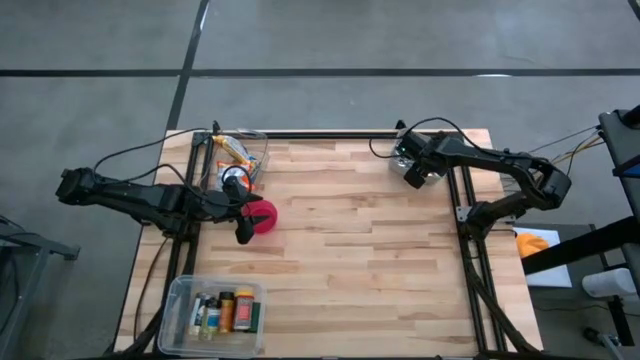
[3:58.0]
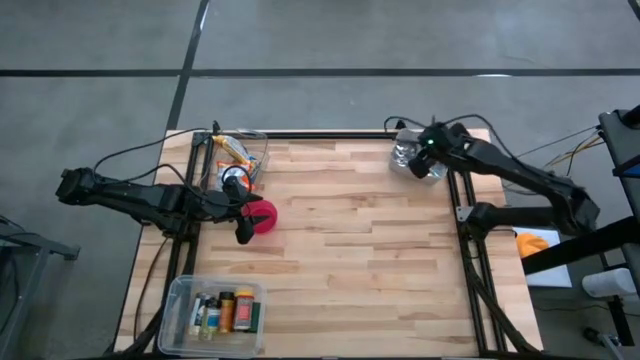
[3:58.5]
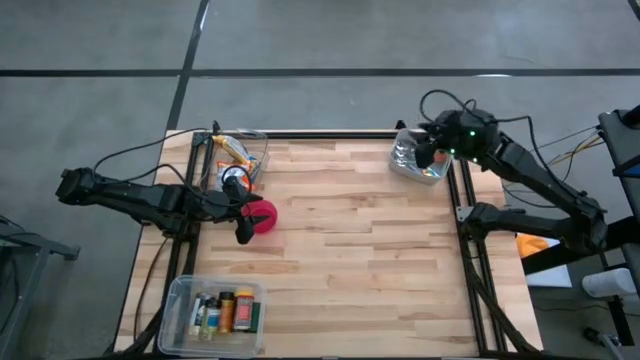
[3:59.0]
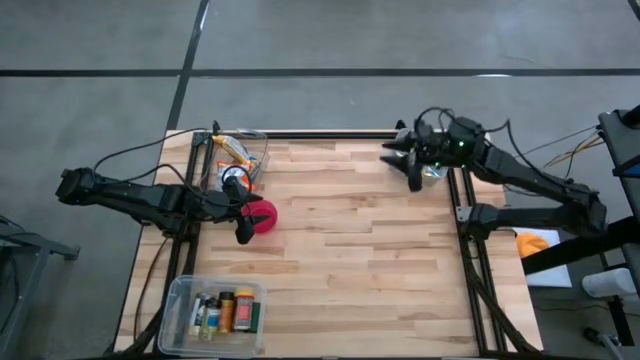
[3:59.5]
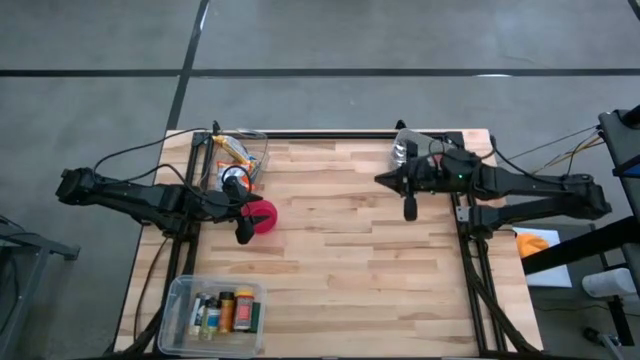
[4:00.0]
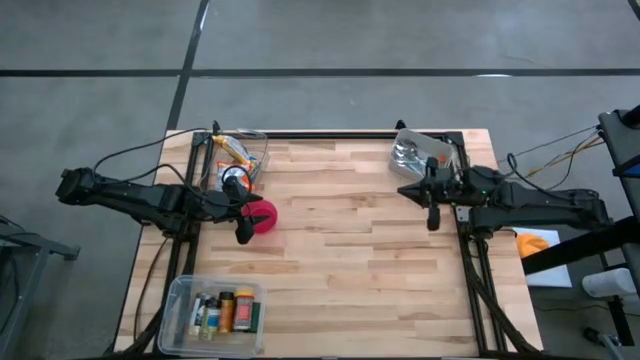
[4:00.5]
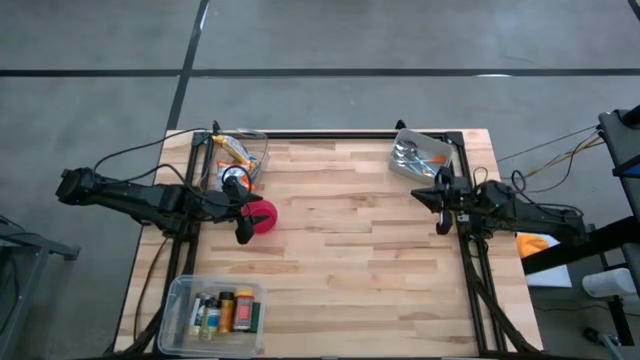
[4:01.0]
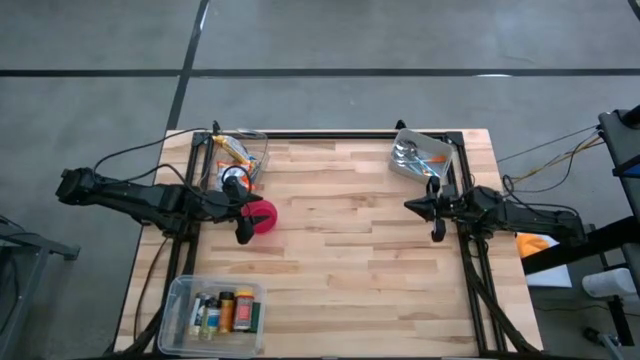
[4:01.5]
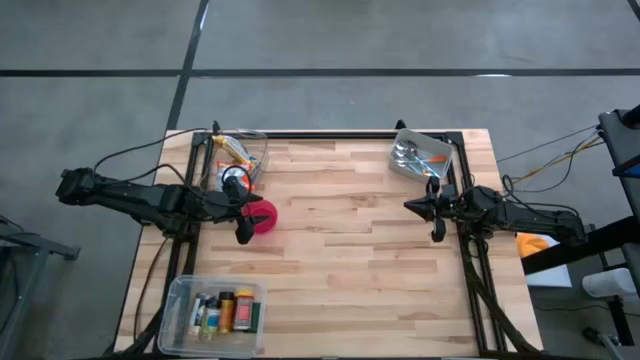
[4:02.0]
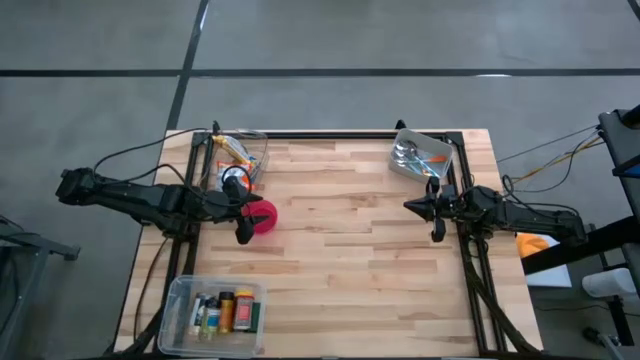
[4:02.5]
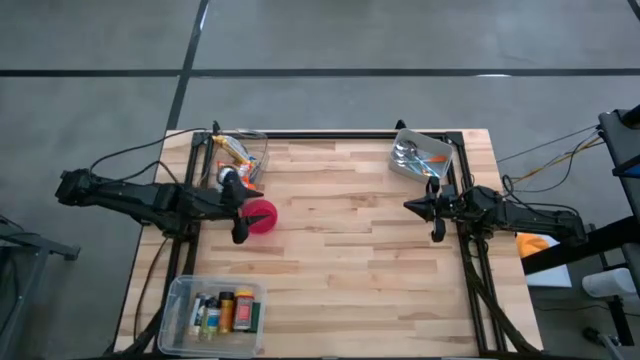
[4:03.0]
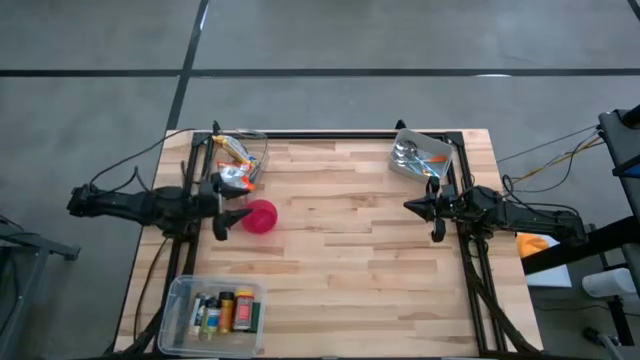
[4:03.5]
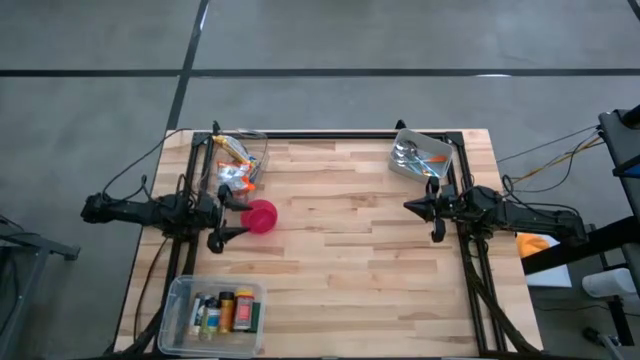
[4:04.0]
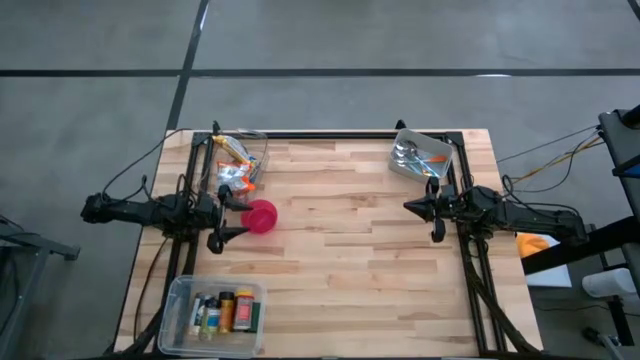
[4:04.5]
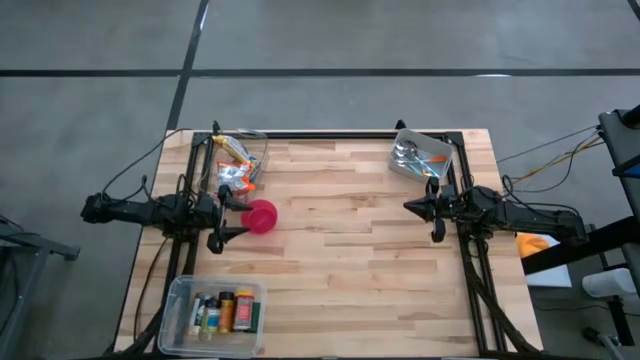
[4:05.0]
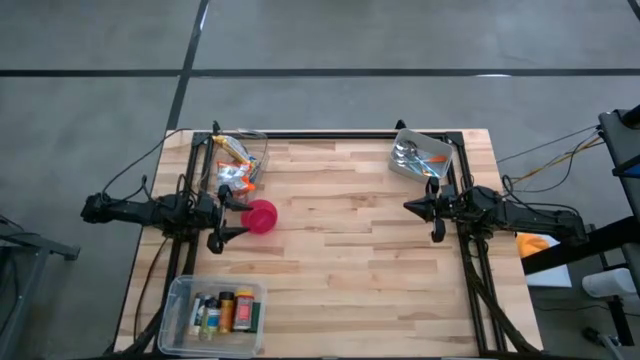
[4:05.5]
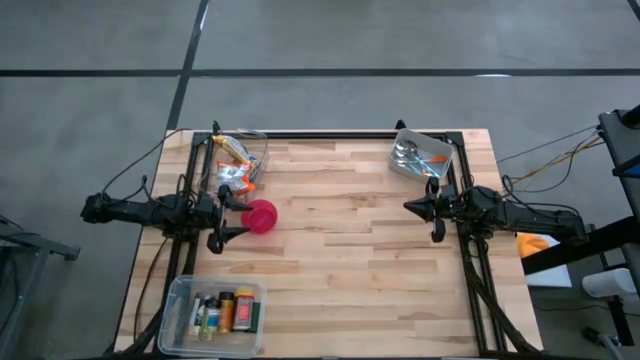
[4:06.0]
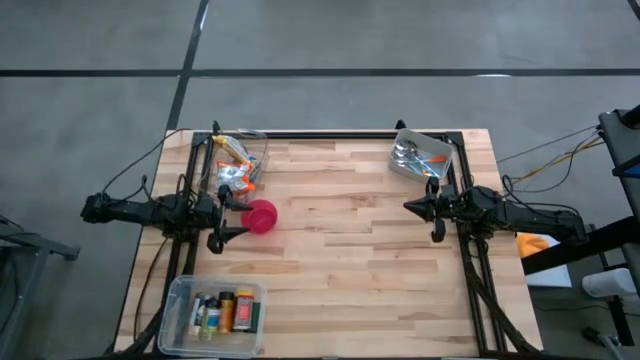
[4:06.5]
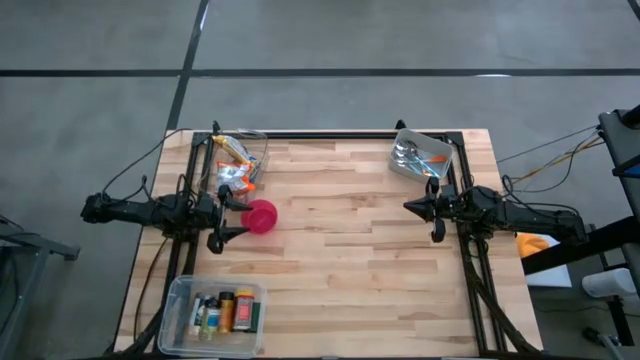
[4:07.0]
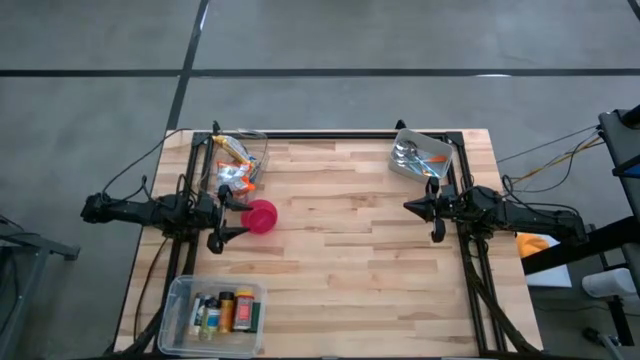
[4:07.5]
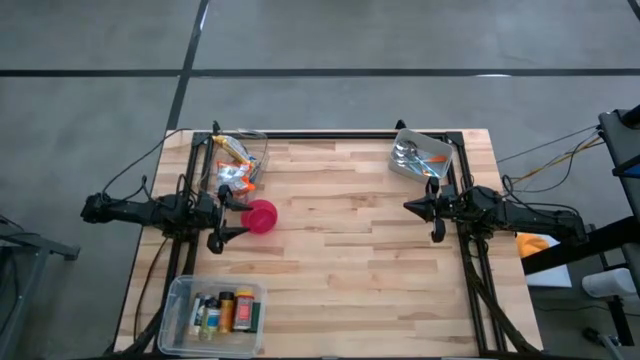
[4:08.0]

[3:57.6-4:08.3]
Return to Home Position
